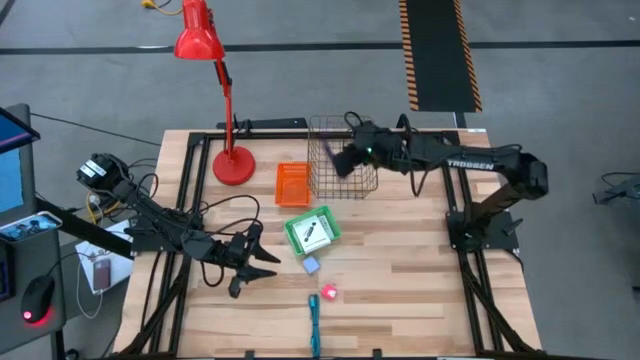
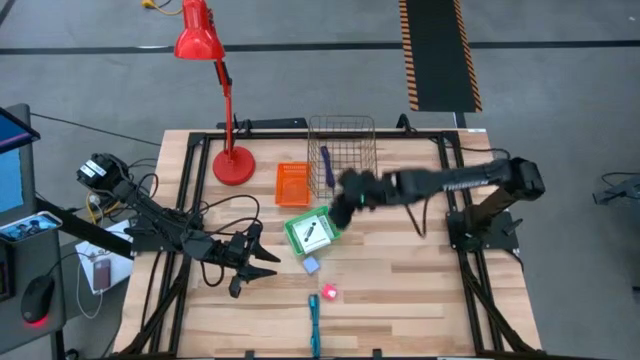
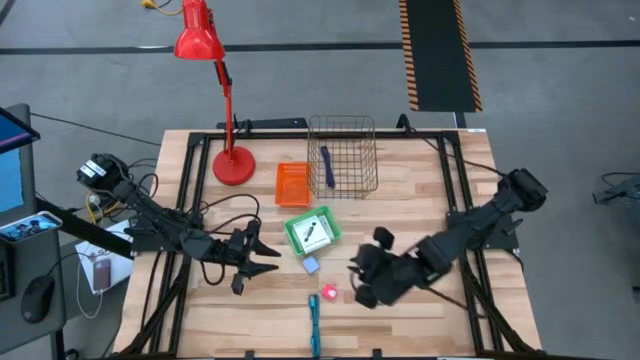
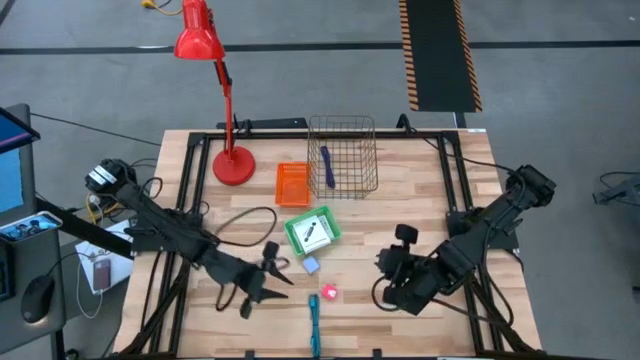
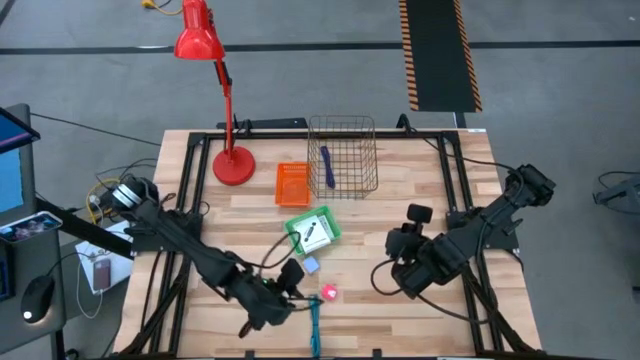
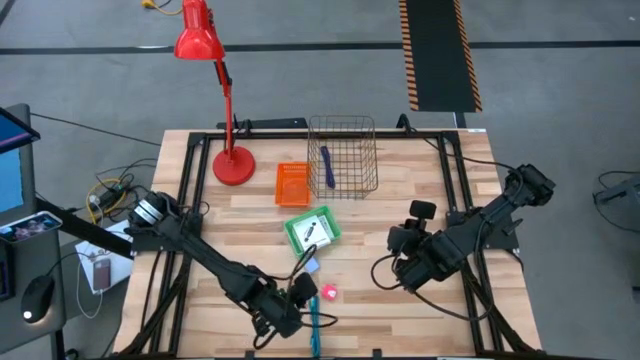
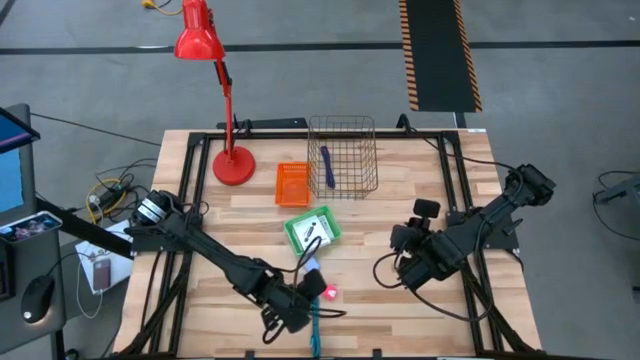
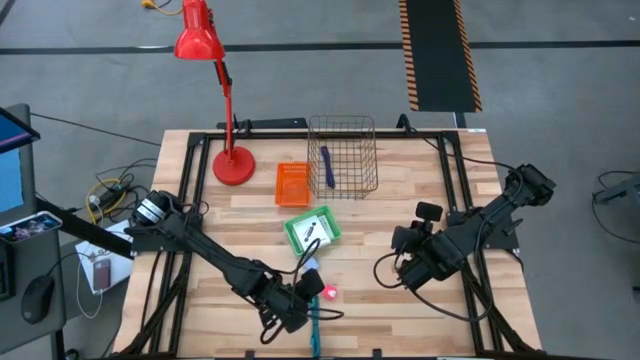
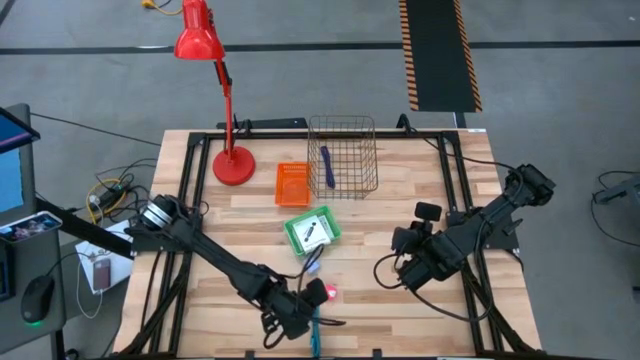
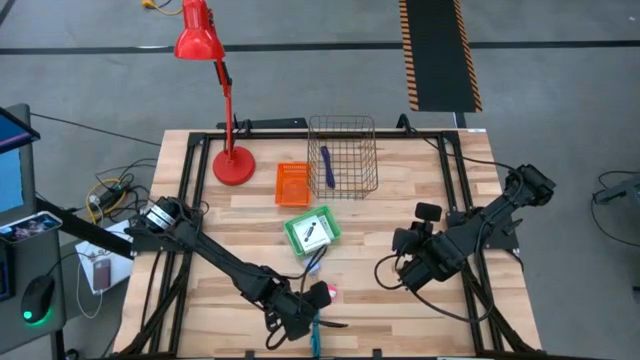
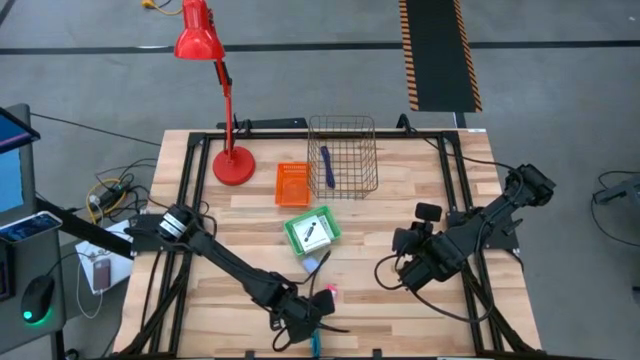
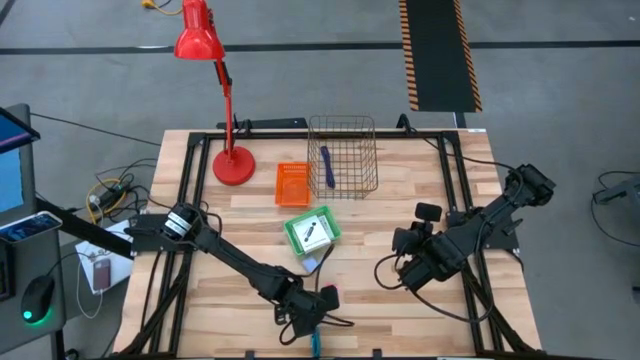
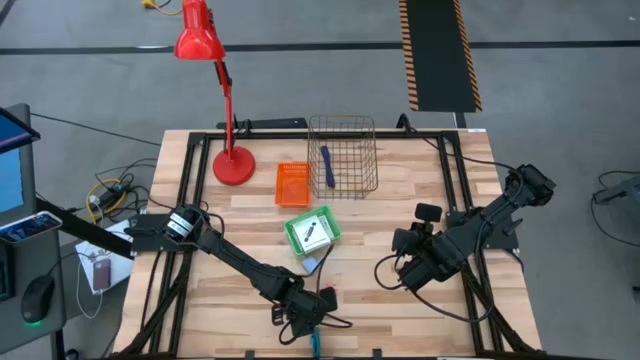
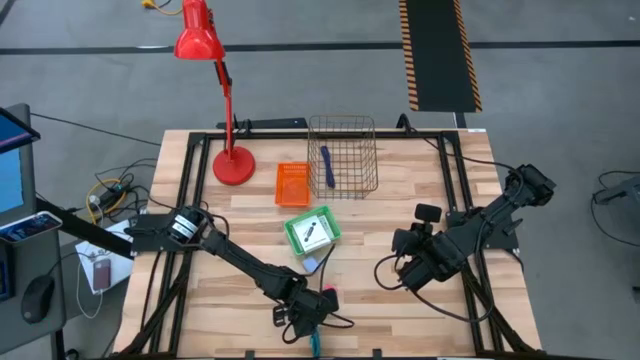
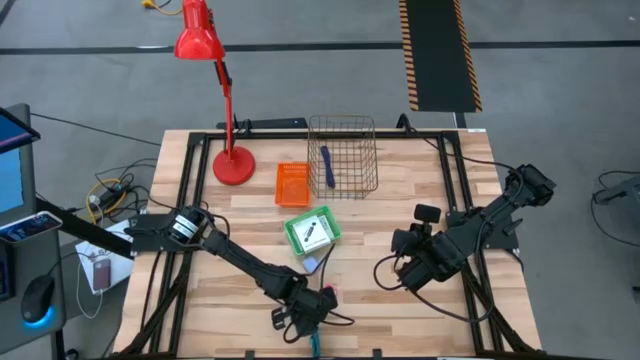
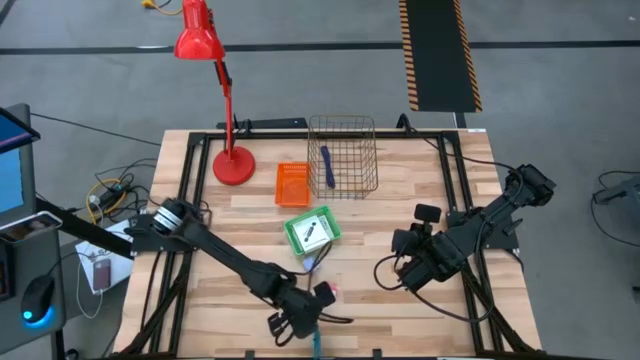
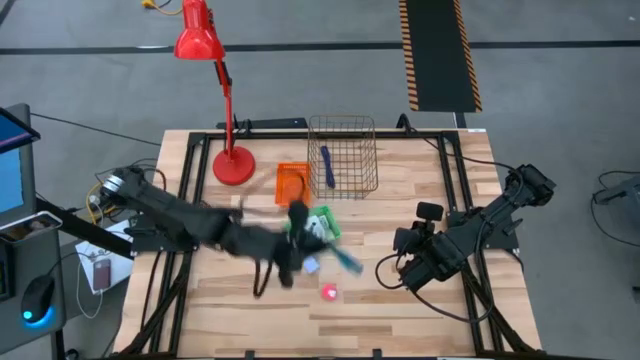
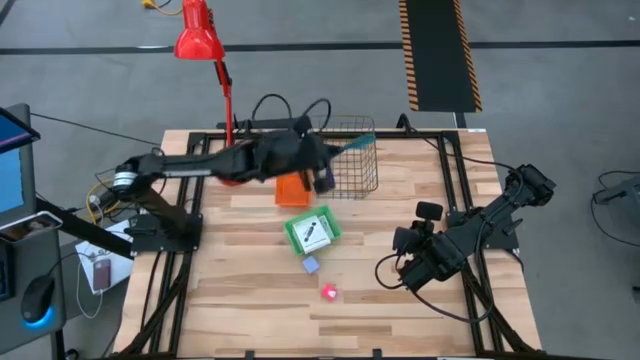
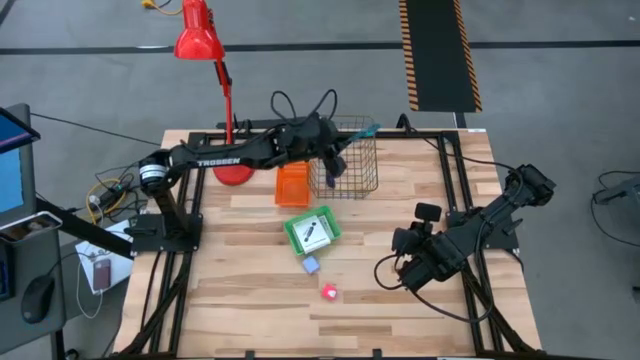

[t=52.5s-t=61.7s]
Task: Pick and place items into bin
Put the blue green charger cord into the wire basket

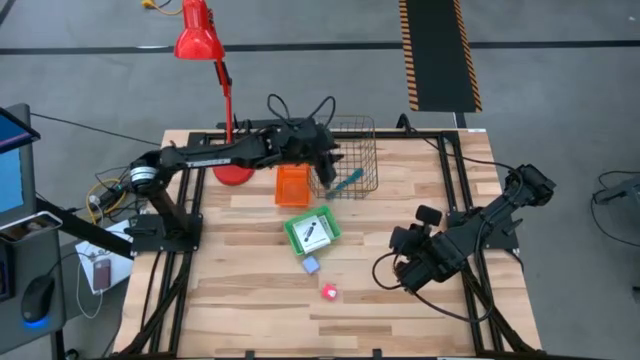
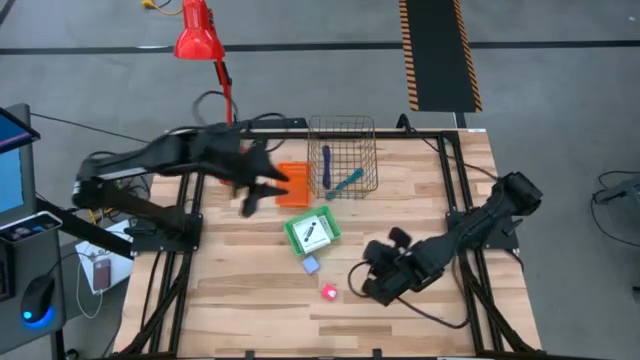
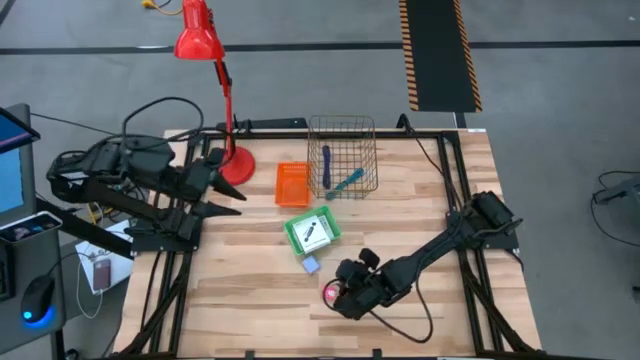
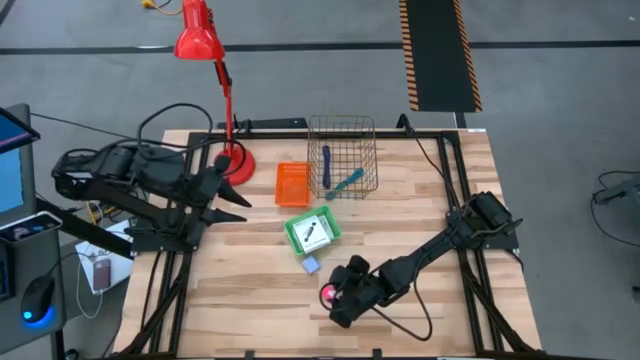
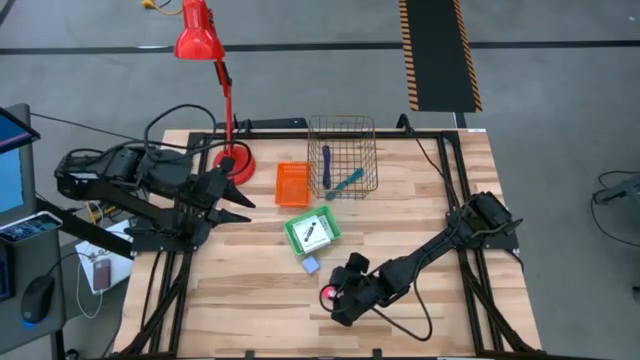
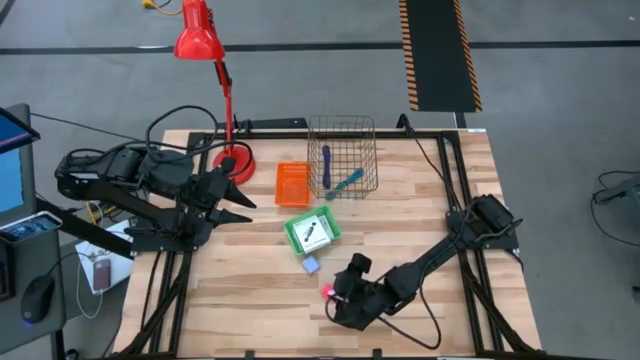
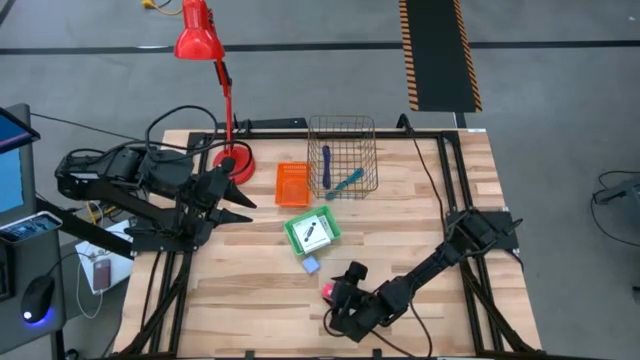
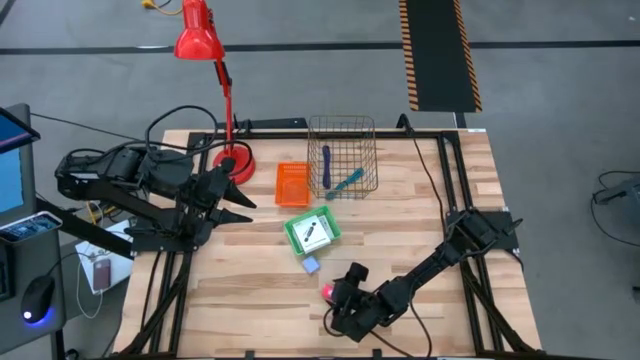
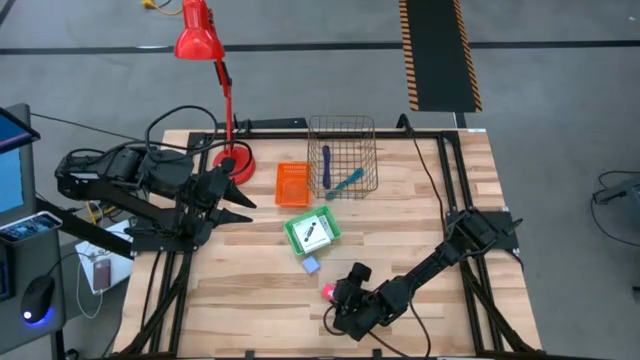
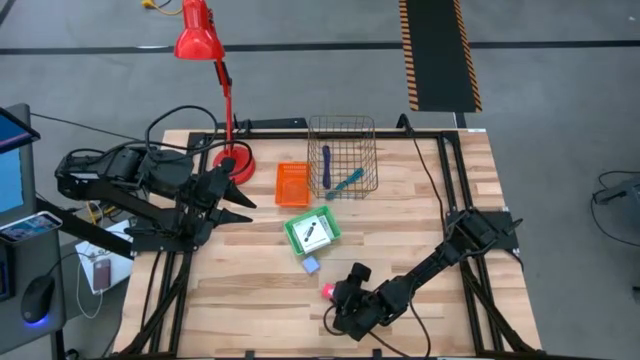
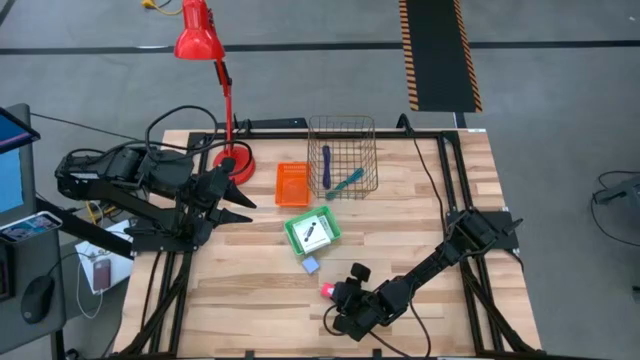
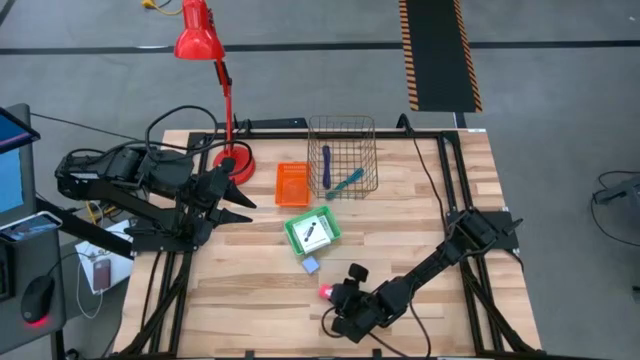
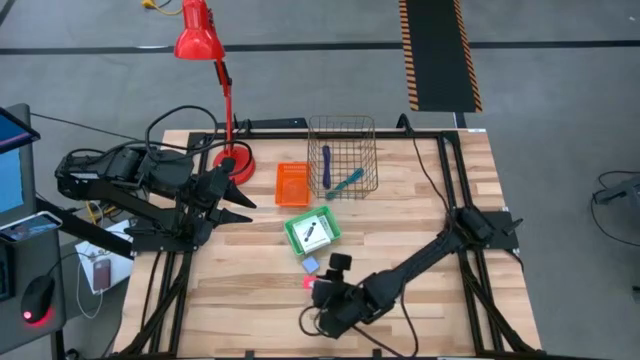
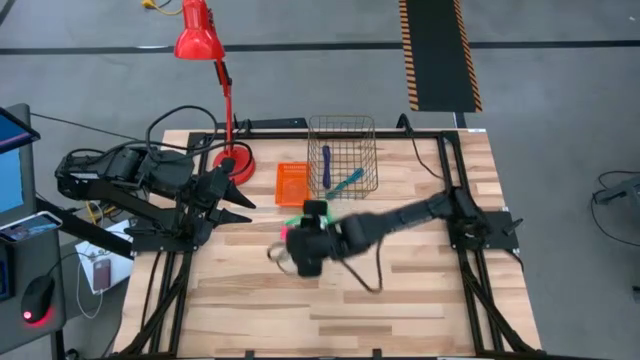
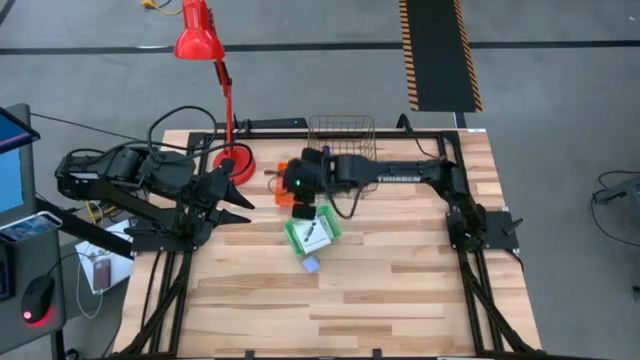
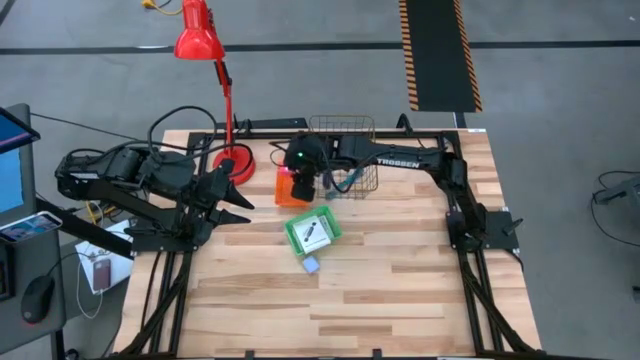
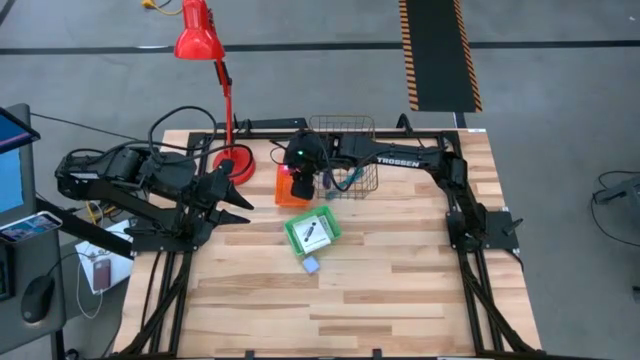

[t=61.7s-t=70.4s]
Put the pink adaptor into the orange bin

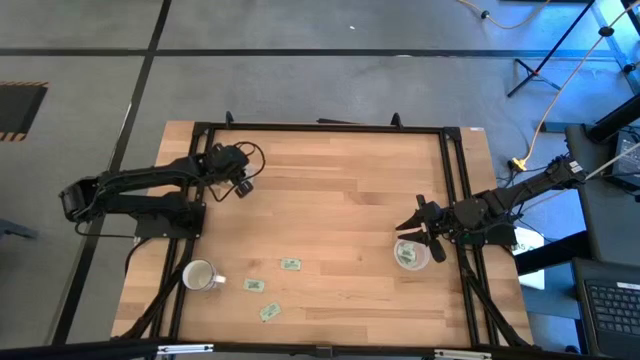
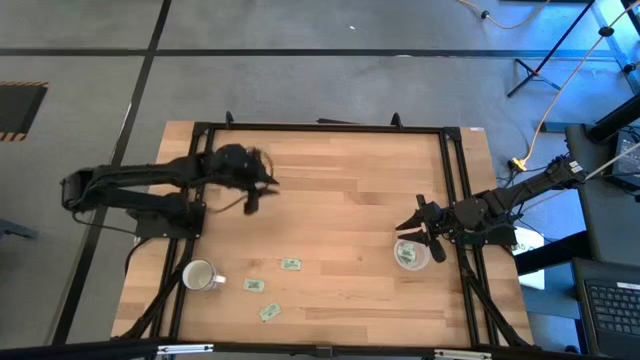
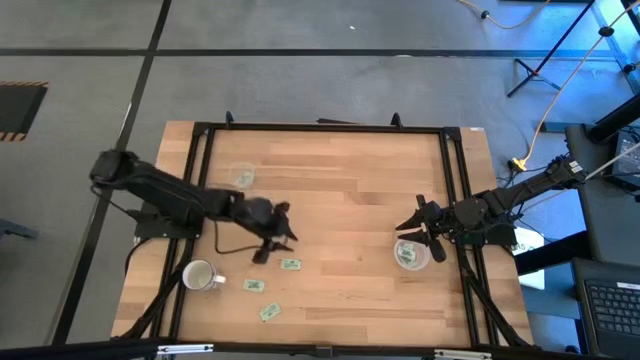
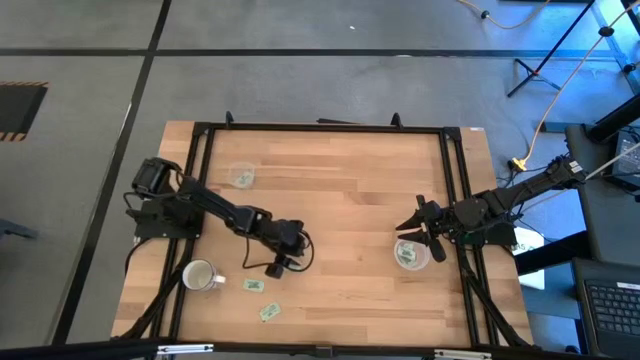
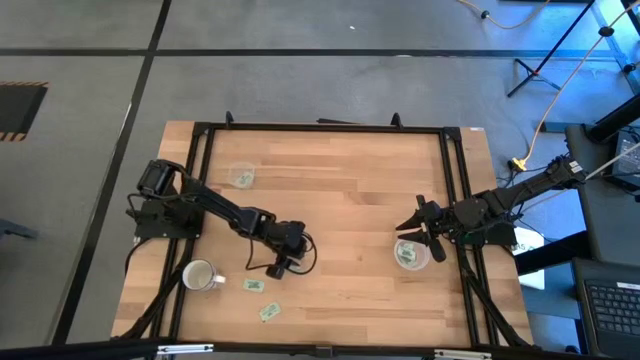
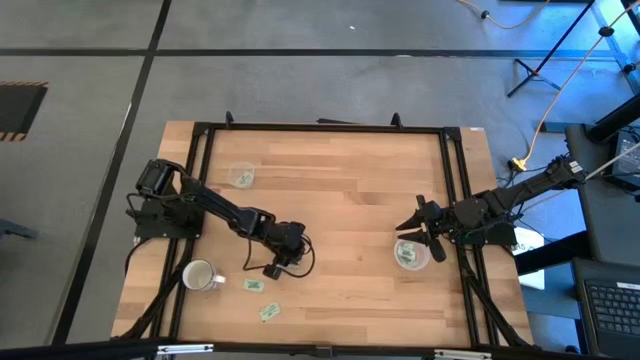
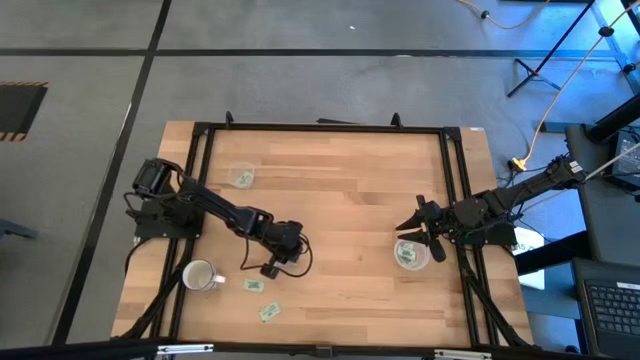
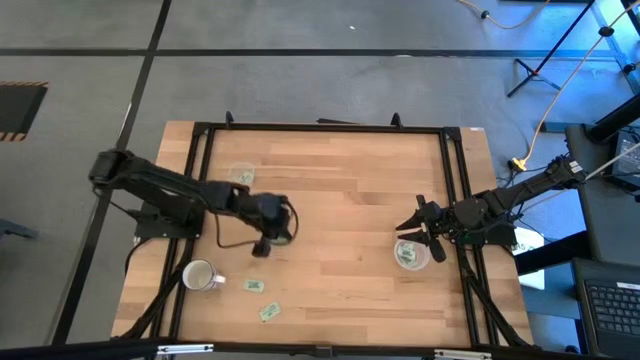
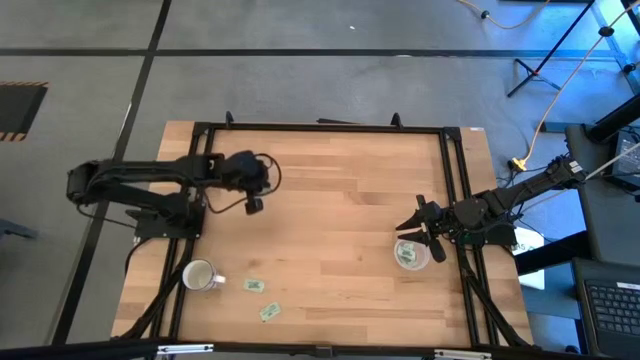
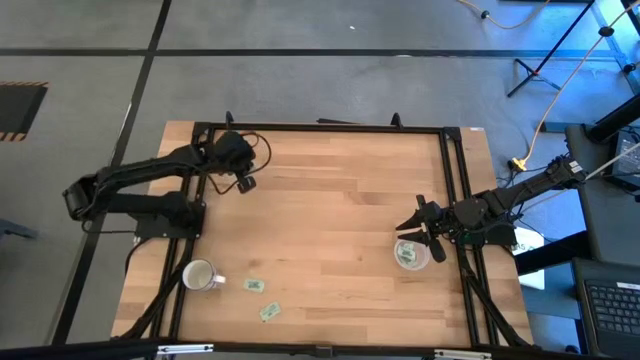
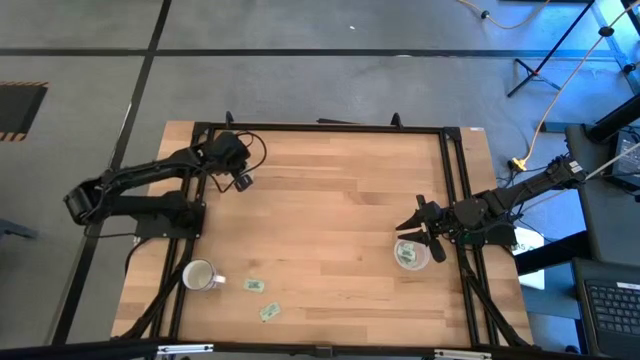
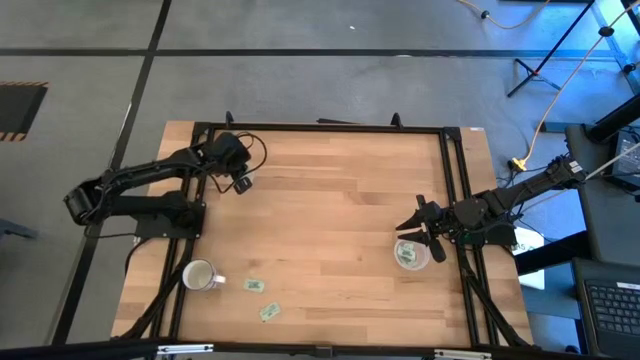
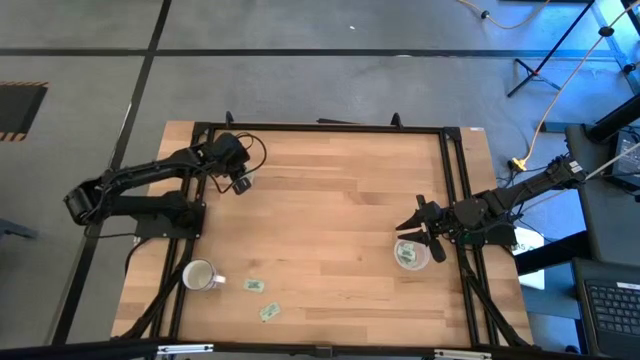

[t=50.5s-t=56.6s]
Task: Pick and place Stevia / Truvia into bins
Put the stevia packet into the square transparent container
